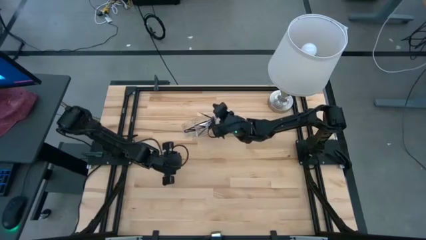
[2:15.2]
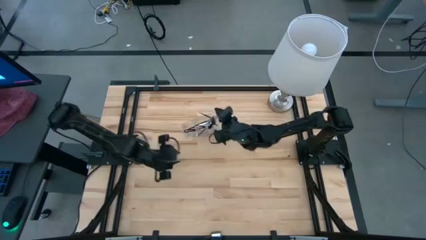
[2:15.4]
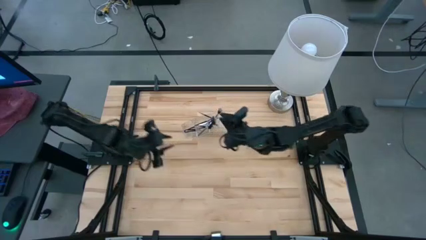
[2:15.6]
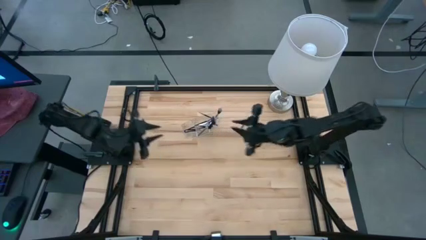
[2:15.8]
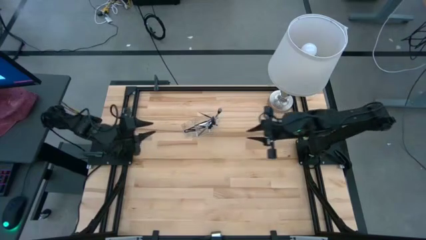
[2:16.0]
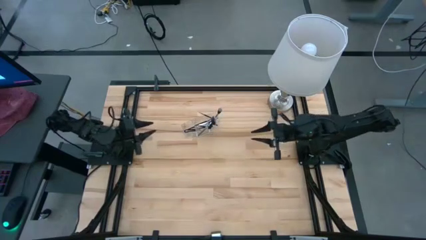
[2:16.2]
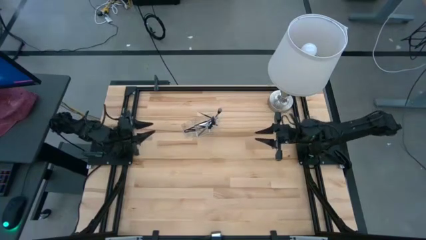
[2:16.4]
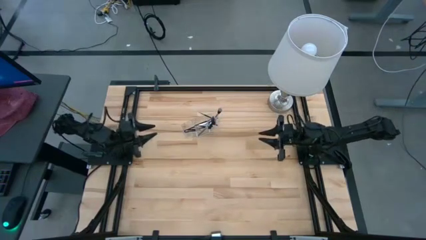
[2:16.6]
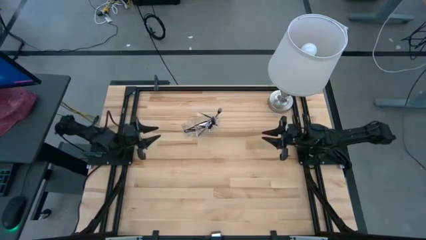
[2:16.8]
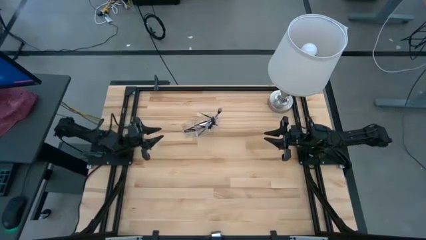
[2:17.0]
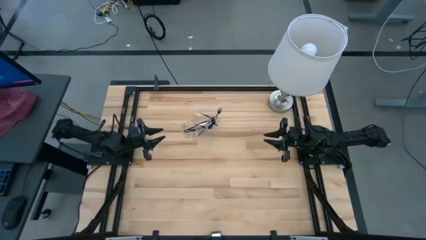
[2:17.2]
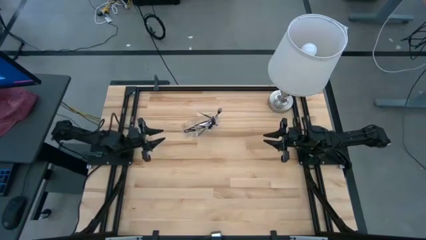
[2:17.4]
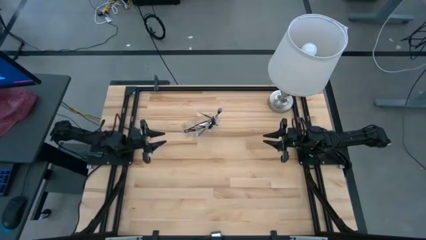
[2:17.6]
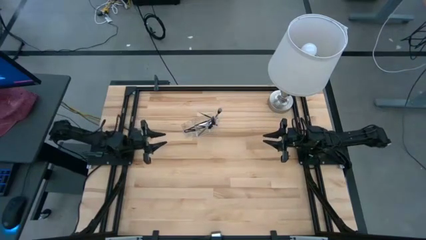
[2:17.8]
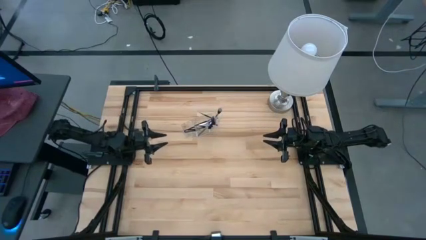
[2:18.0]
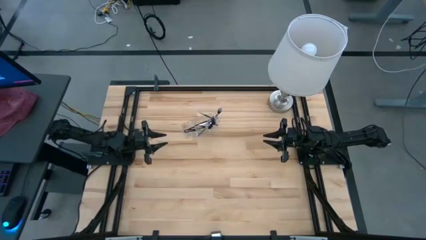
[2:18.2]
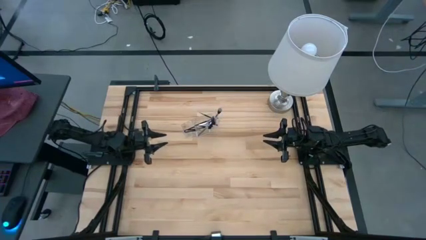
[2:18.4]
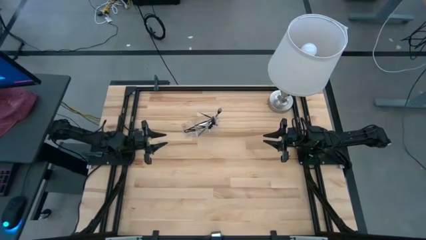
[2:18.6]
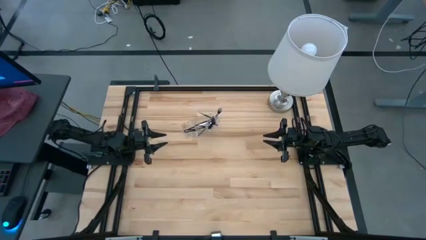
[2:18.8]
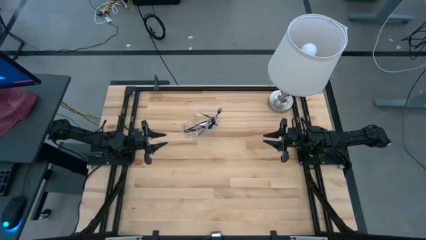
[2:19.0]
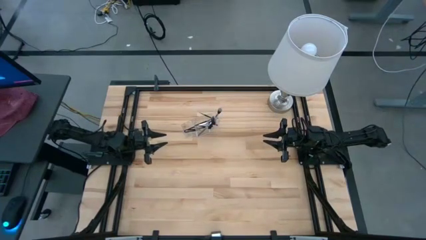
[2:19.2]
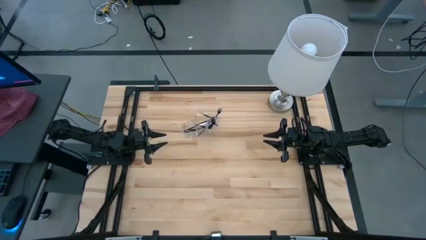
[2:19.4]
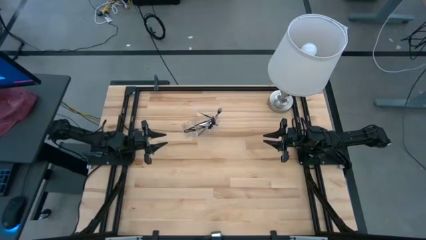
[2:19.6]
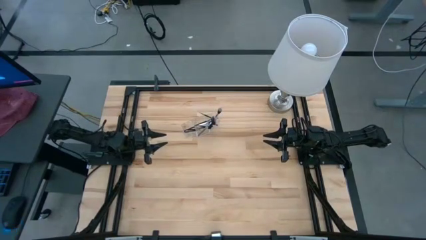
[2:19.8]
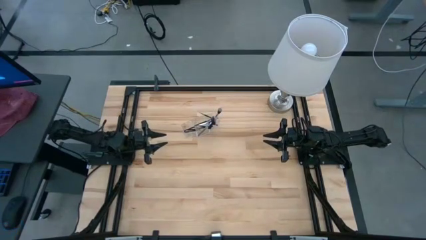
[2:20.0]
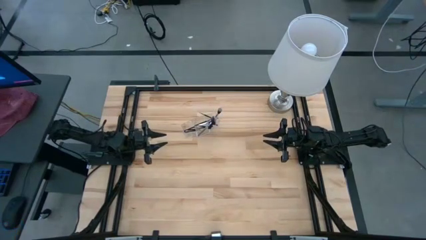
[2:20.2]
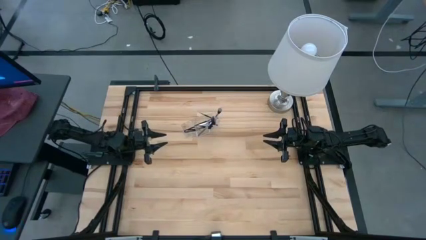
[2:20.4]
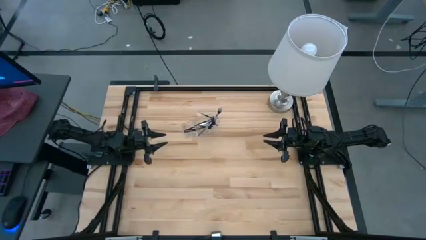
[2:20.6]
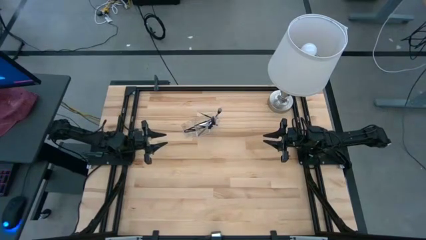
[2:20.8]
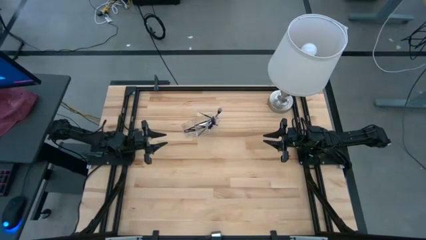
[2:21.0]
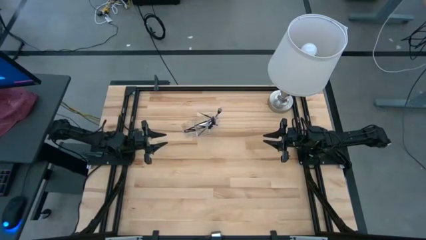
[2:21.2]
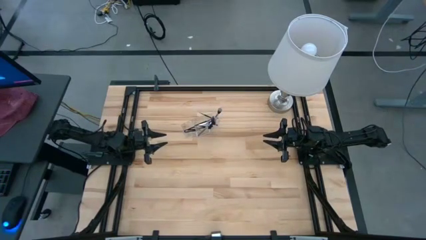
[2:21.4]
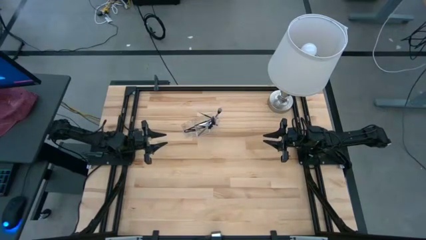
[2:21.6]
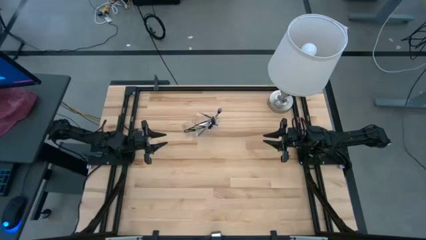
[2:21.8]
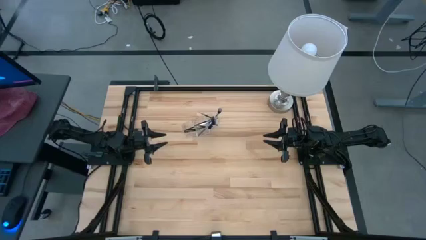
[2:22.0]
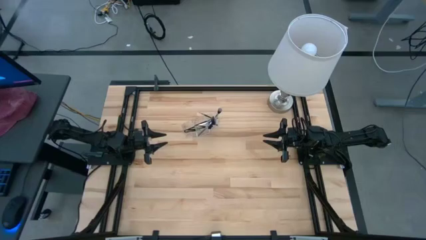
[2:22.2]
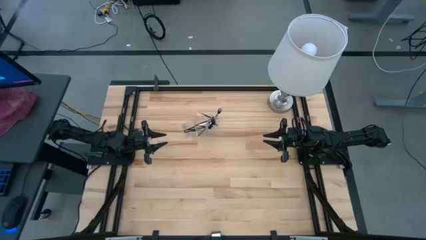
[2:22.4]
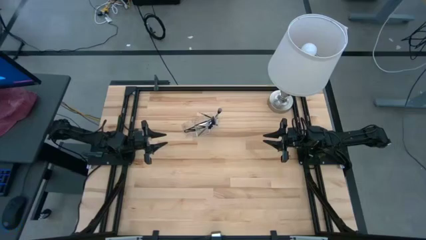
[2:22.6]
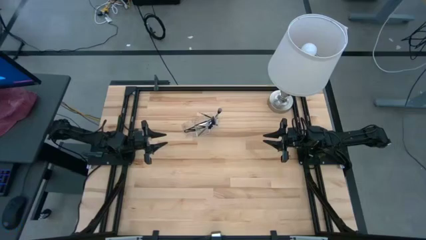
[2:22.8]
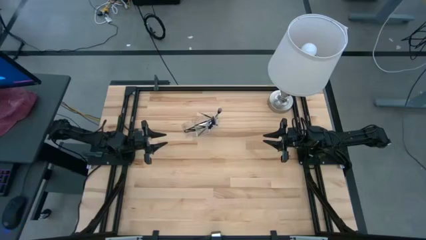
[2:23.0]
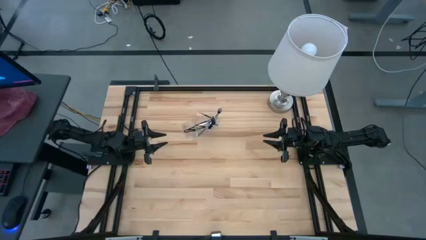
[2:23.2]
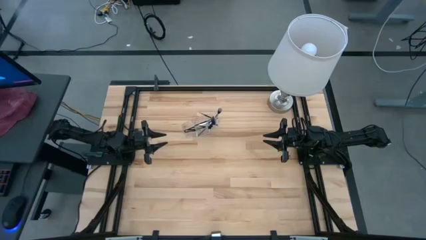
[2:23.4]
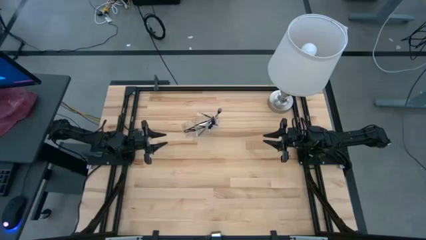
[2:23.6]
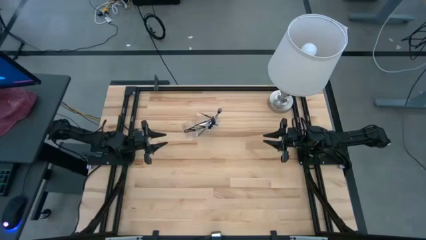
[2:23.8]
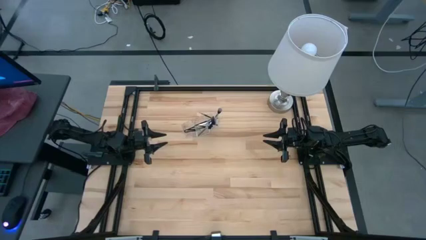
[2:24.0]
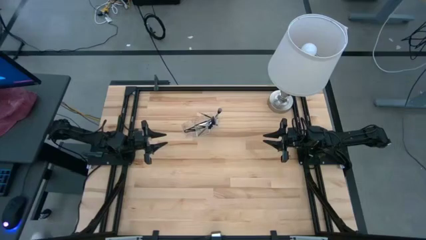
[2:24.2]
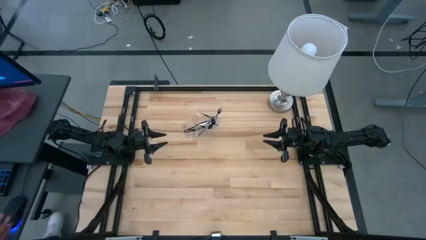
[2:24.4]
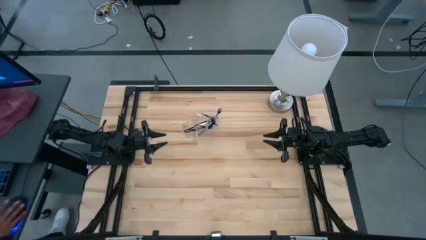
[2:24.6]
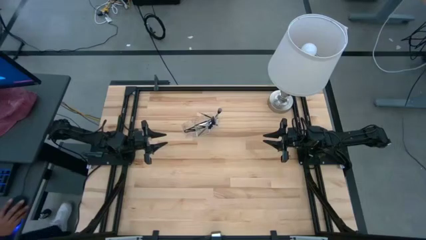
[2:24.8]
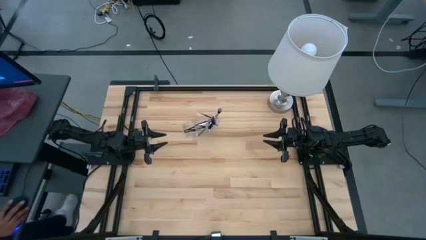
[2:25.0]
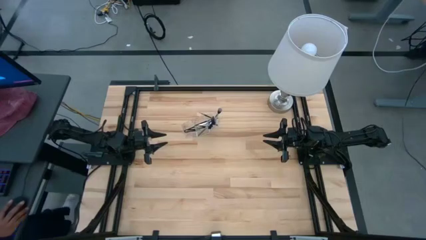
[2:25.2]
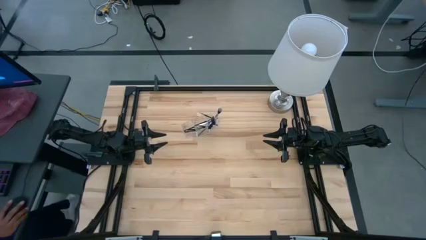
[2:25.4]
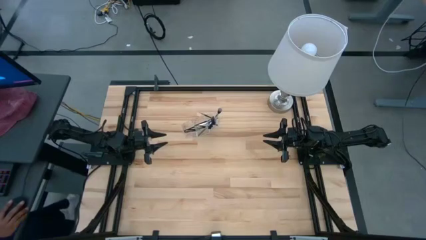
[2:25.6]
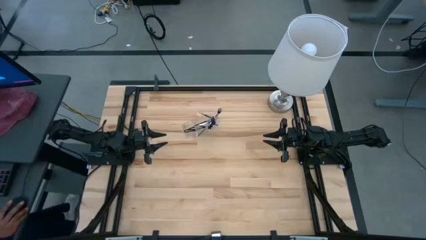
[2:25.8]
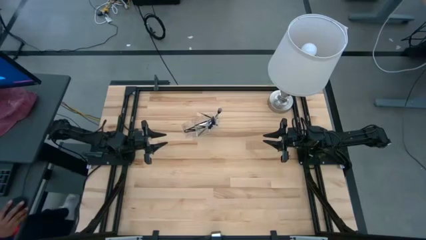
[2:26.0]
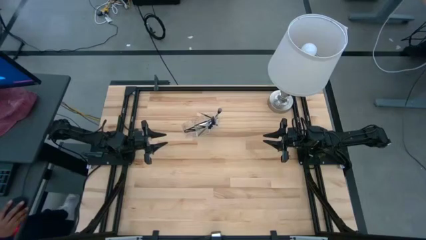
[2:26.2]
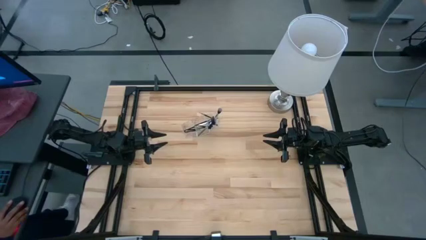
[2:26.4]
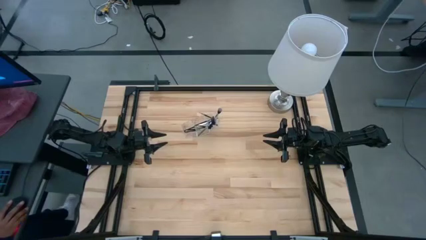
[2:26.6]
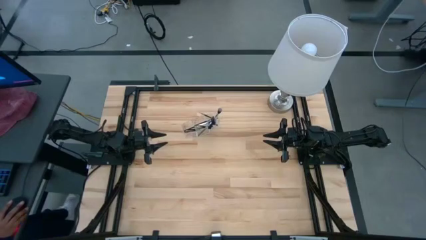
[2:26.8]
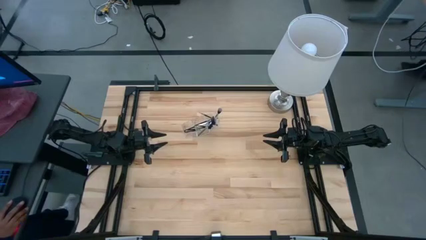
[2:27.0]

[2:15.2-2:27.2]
Task: Put items in baskets/containers
Return to Home Position
